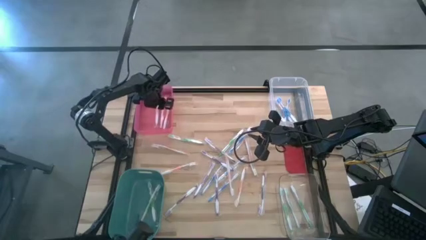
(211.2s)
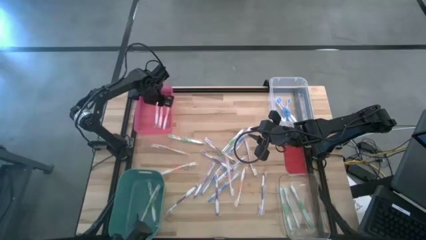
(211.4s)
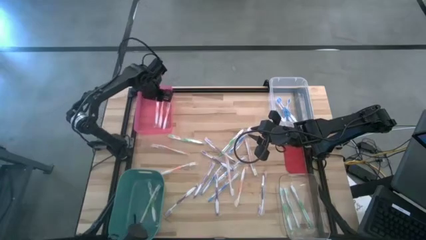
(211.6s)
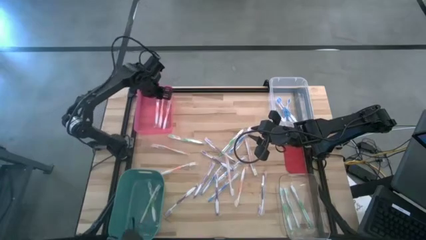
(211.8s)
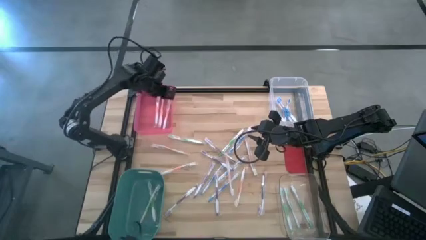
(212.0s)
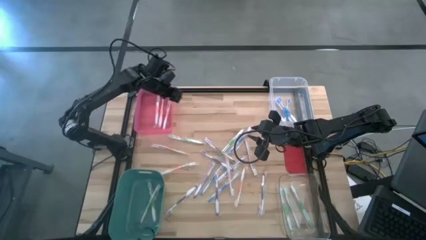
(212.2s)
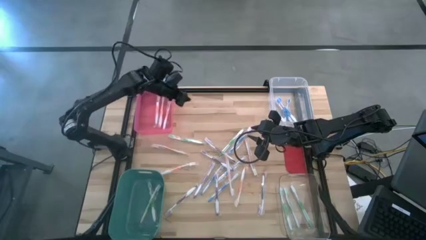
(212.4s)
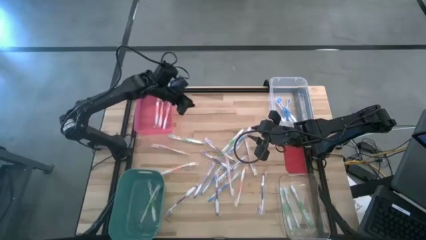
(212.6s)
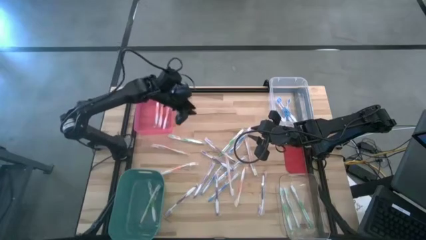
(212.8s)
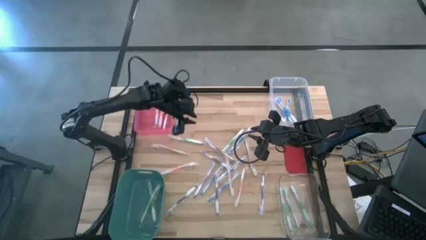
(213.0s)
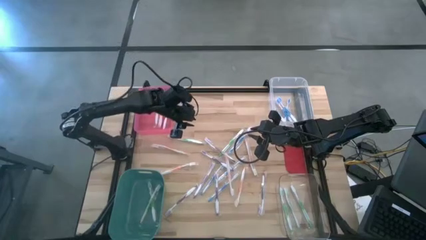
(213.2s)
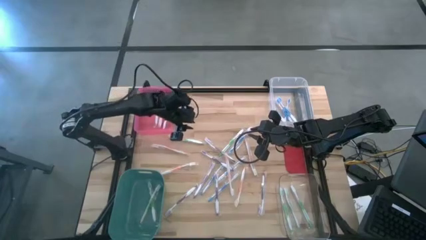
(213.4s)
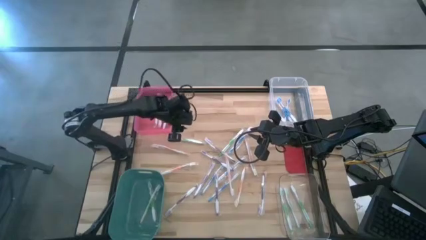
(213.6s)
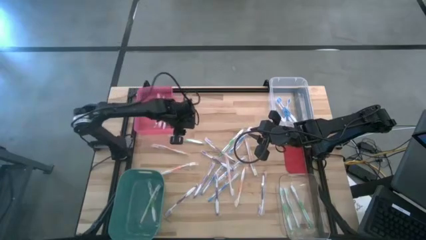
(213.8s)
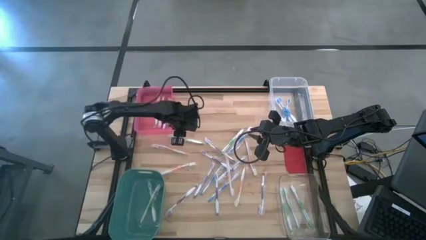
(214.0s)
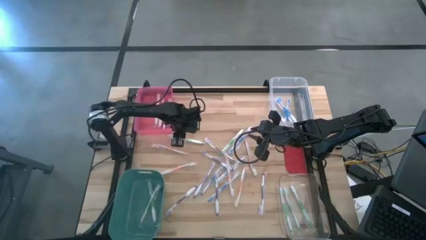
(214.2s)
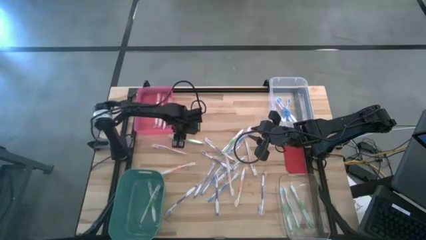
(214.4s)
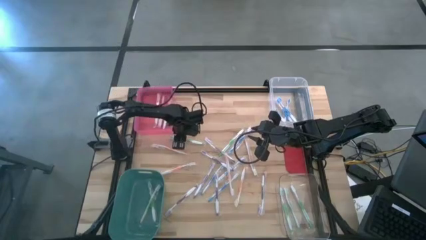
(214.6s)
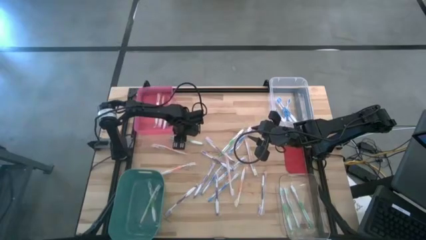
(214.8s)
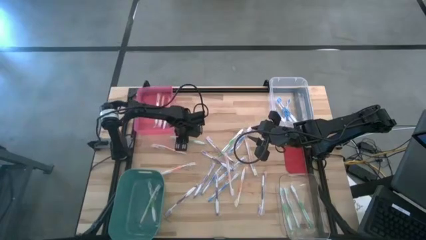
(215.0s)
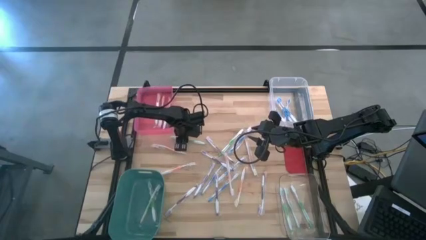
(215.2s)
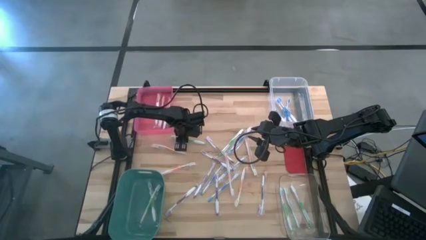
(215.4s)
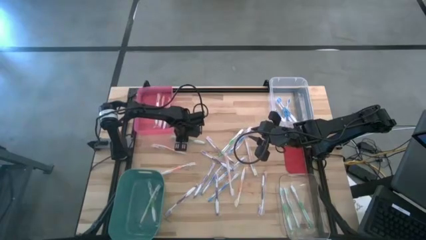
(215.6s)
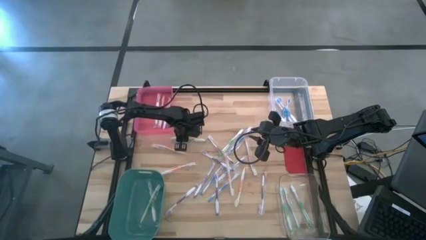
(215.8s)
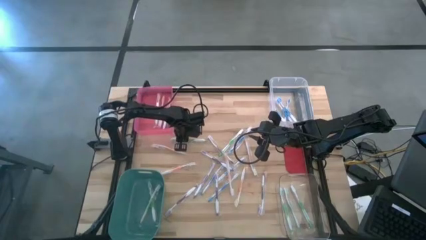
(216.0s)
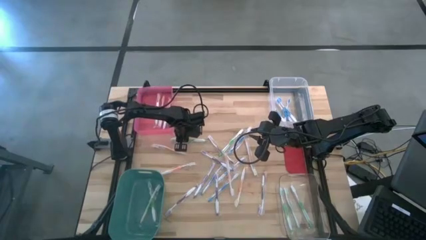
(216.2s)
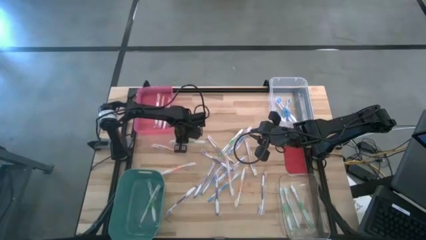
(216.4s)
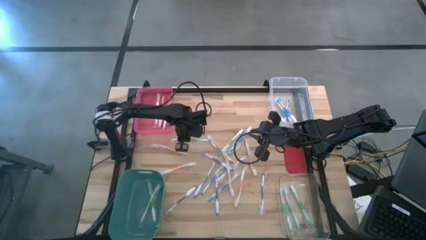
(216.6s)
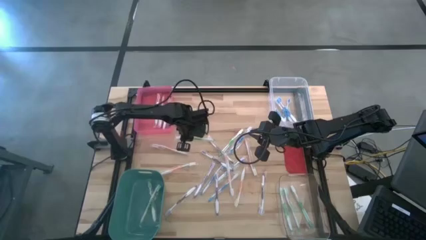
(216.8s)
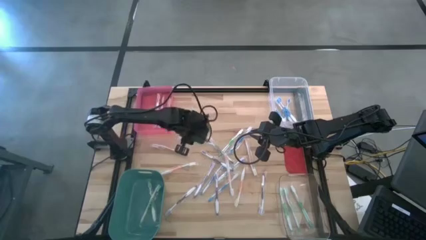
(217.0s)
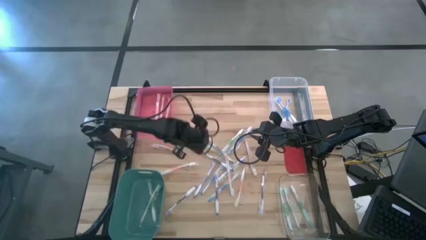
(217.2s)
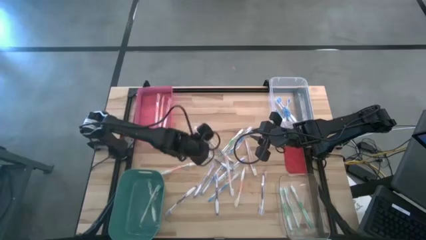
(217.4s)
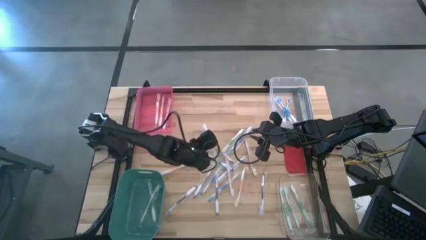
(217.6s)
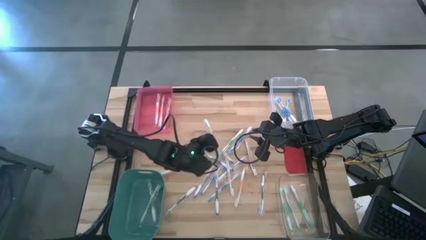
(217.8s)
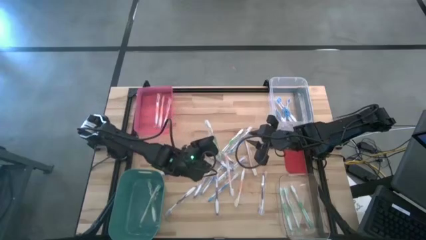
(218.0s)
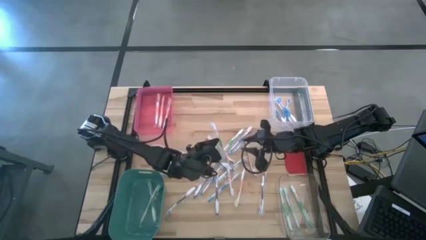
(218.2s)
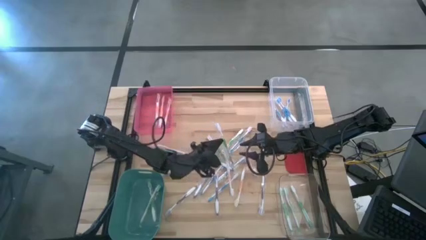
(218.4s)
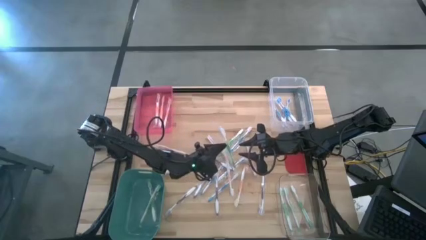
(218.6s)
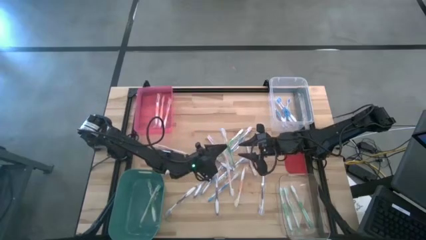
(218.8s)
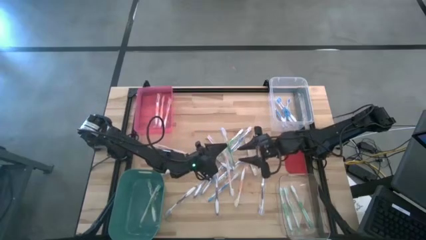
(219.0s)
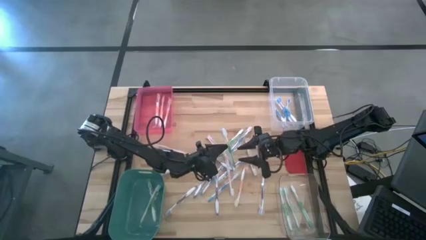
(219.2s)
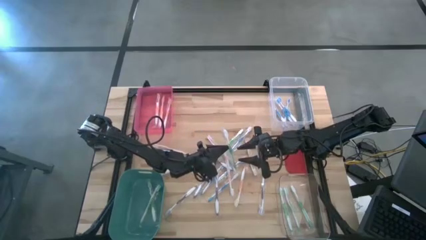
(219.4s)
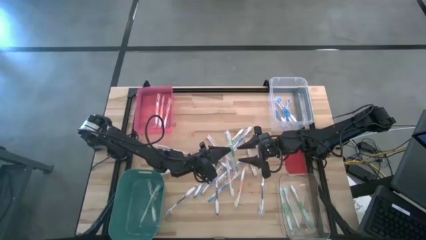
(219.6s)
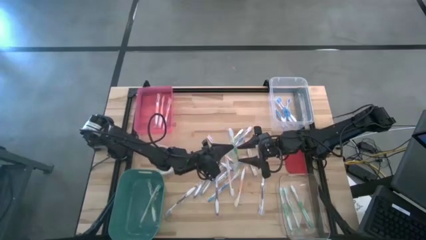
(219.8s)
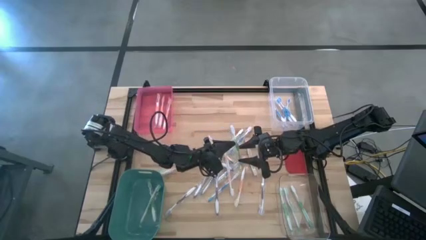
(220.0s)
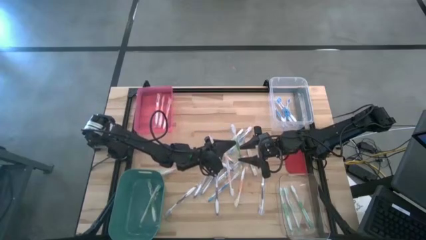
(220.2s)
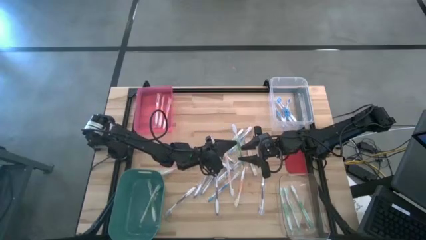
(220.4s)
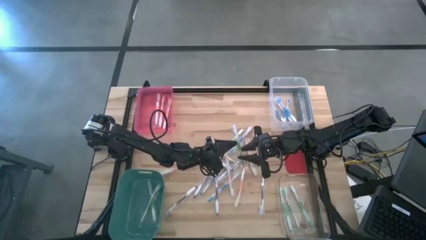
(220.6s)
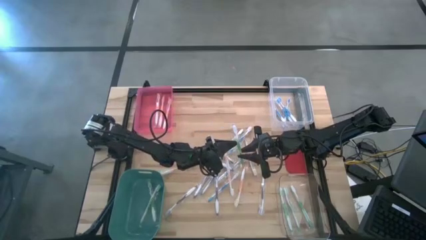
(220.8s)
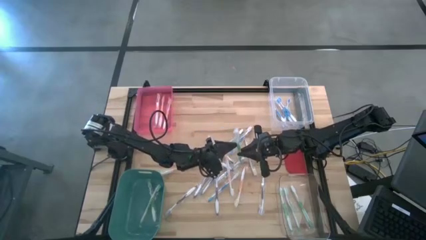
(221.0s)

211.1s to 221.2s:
Task: Pick & Place Toothbrushes
Put the green toothbrush into the green bin

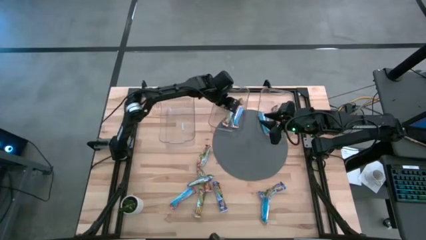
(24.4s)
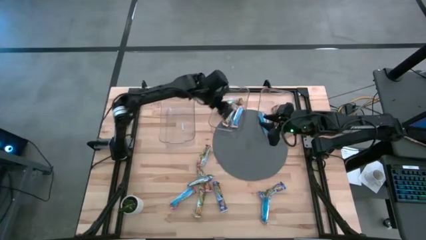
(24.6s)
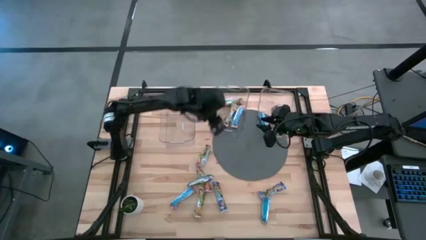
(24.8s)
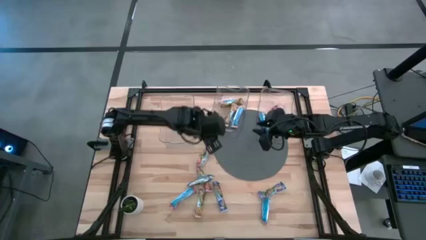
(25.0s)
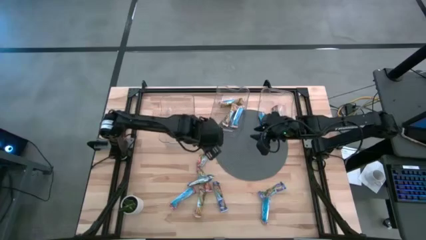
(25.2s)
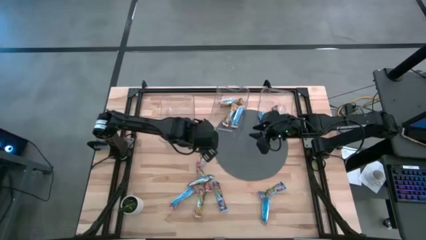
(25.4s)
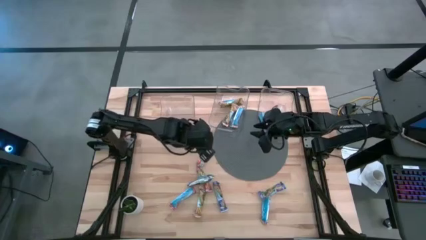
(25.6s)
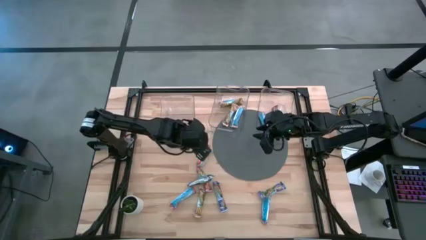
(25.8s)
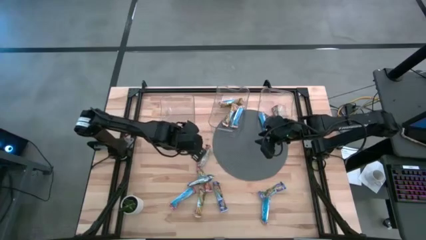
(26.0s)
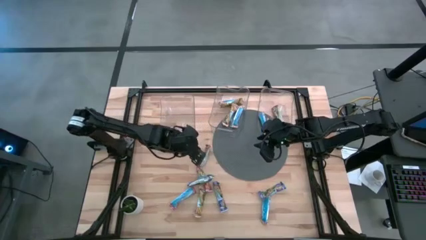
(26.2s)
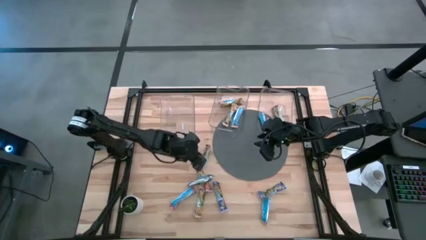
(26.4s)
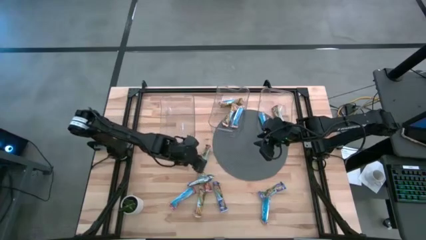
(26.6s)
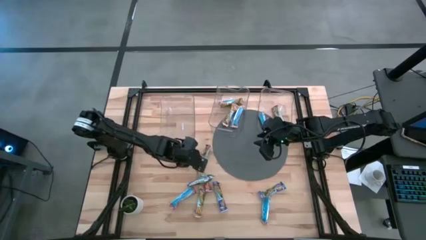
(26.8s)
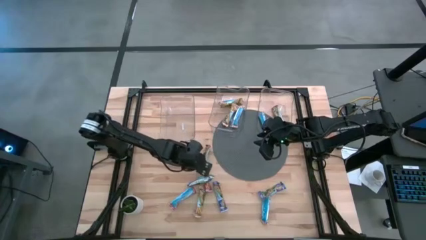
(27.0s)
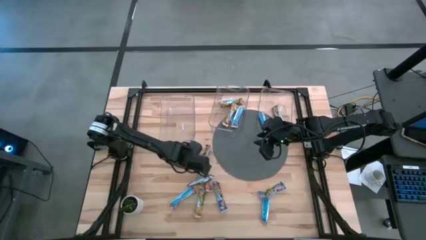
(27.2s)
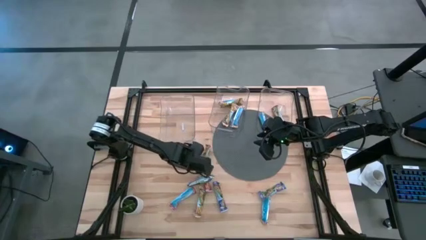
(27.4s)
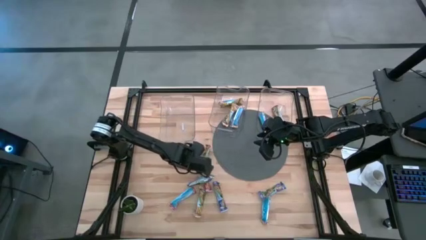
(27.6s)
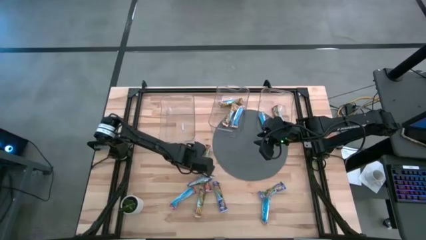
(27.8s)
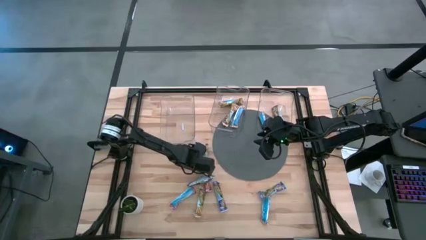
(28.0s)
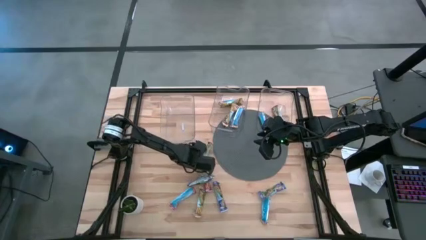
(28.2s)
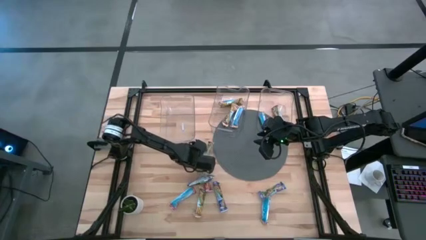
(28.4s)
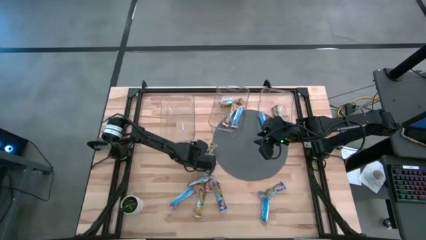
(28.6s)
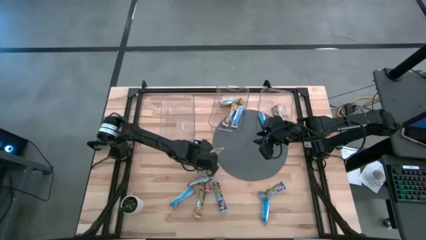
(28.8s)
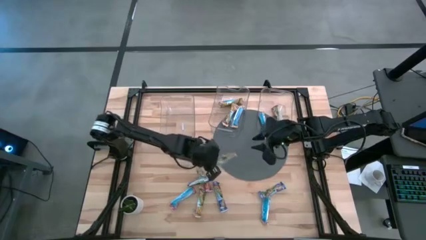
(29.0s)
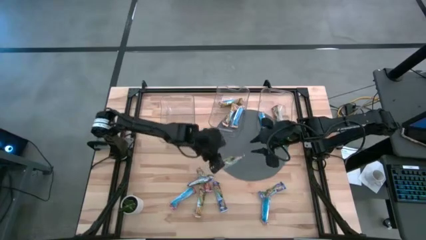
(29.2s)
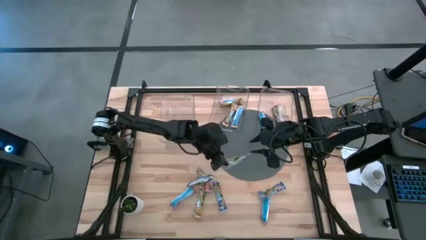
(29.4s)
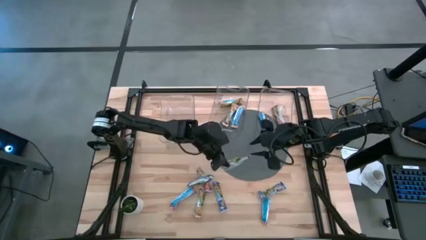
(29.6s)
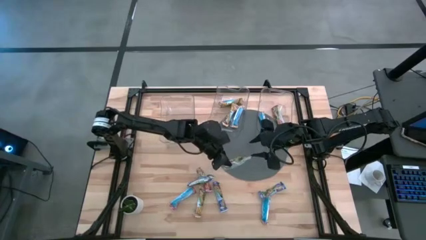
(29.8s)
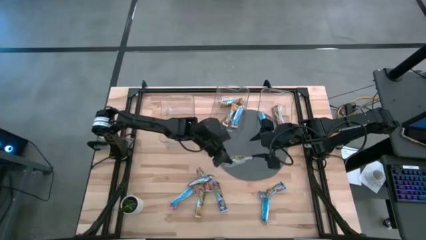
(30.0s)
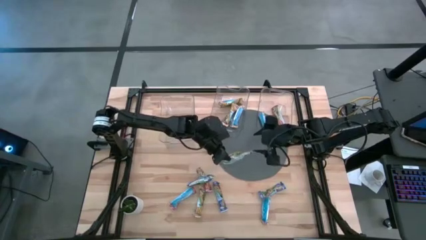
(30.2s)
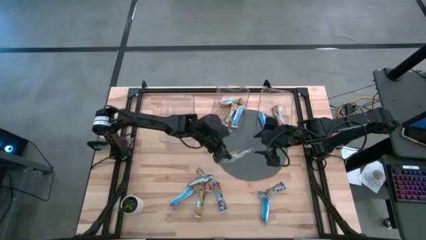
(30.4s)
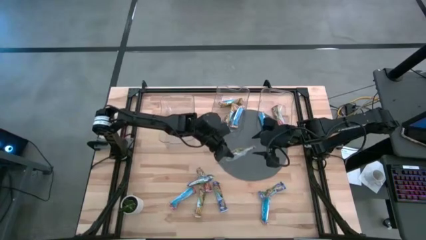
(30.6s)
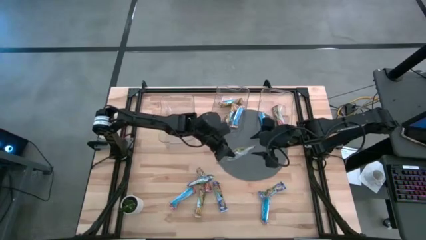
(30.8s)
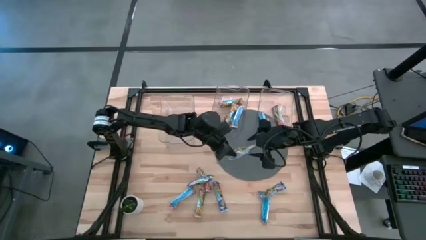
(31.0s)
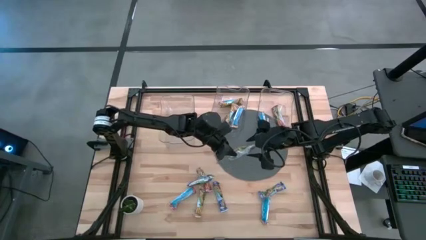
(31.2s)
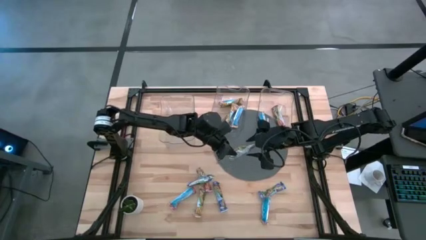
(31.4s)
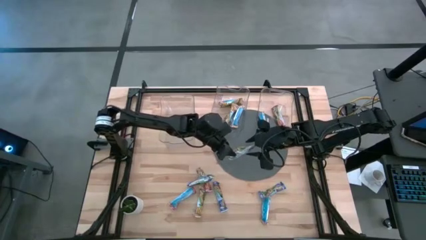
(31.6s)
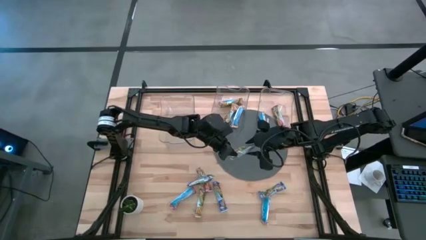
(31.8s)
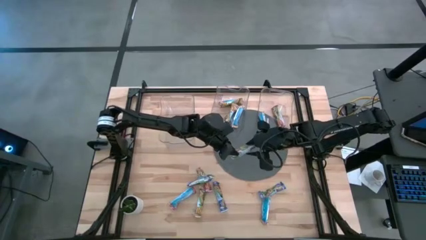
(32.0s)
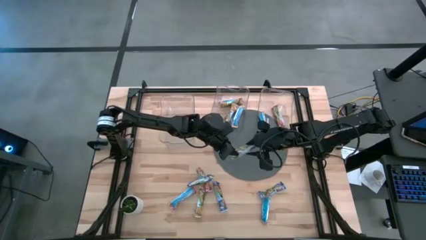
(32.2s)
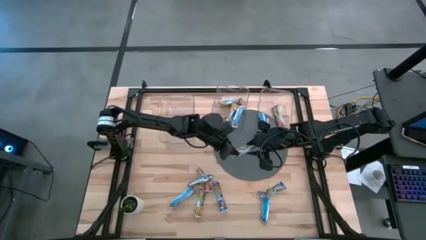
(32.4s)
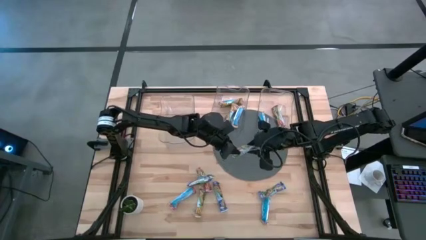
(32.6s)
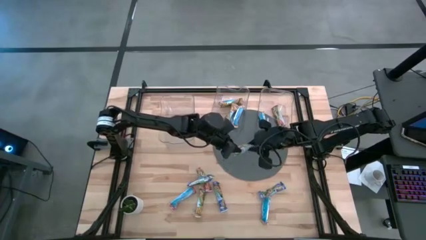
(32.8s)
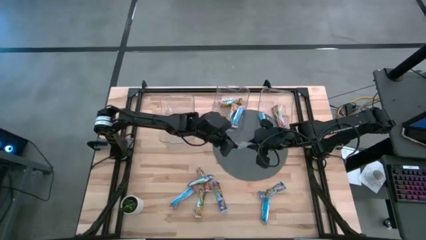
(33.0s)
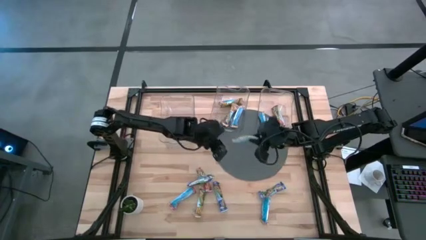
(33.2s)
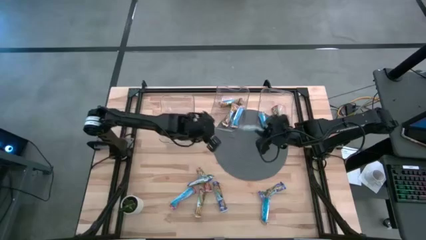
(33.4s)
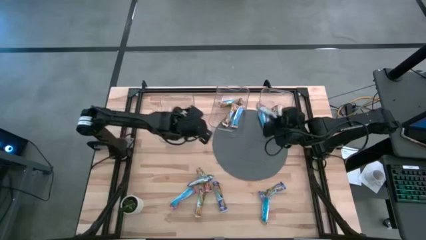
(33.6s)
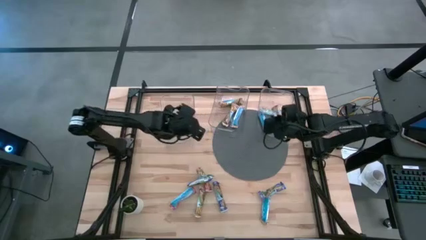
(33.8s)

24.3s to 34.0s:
Task: Pick and place Granola Bars by type
Put the red granola bar into the right transparent bin
